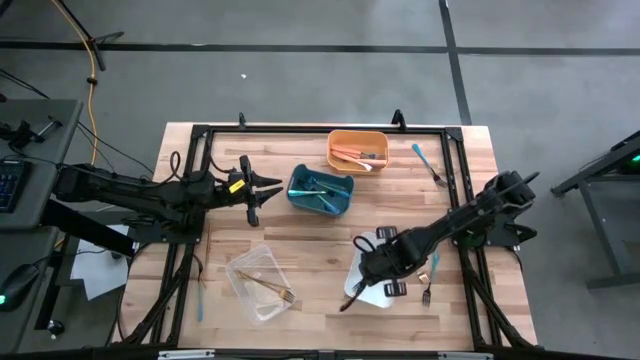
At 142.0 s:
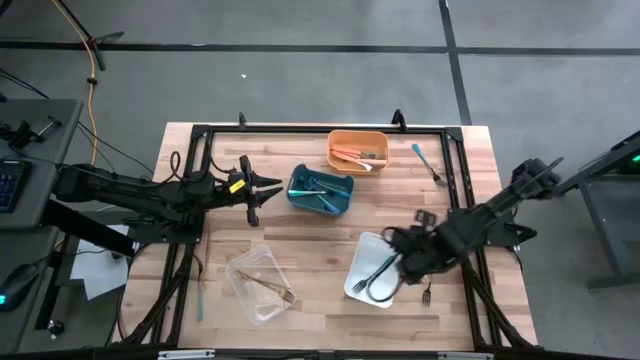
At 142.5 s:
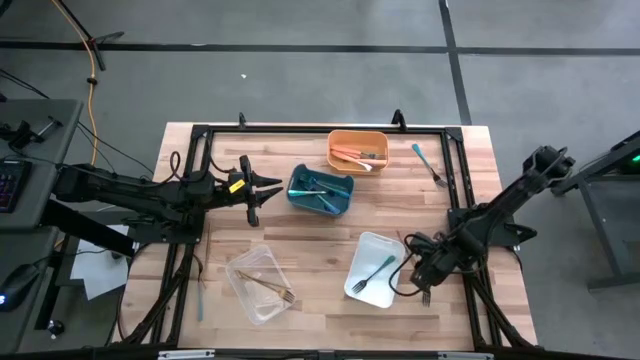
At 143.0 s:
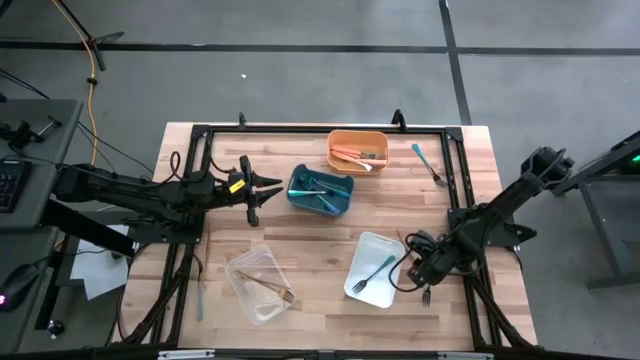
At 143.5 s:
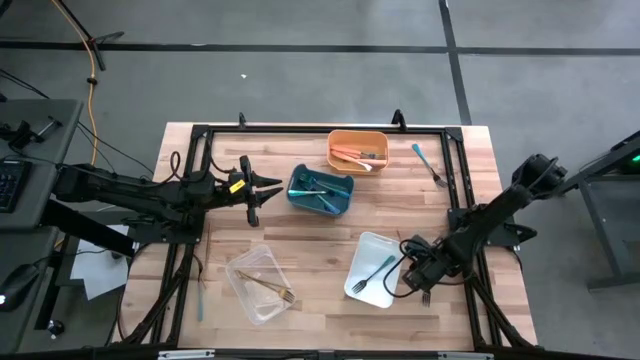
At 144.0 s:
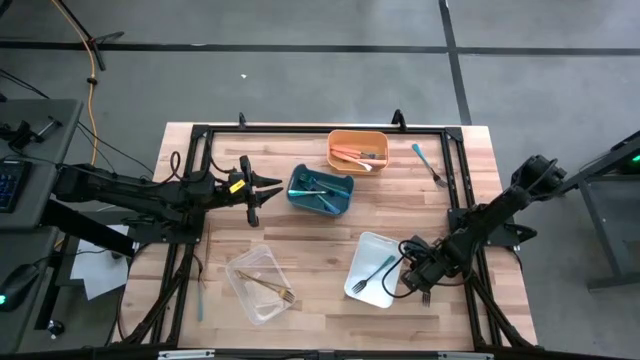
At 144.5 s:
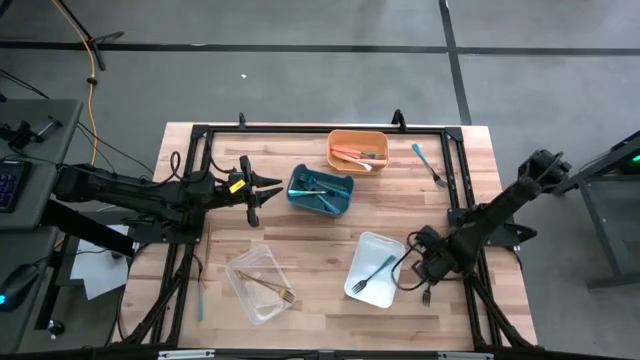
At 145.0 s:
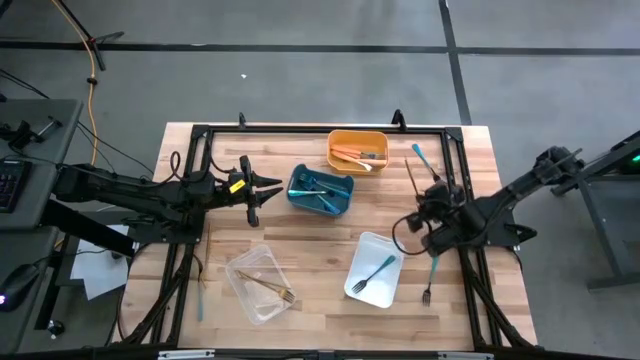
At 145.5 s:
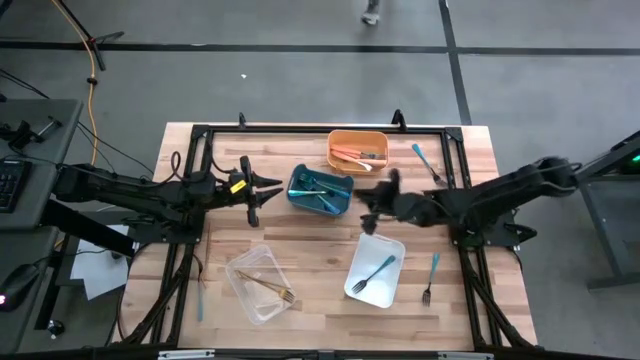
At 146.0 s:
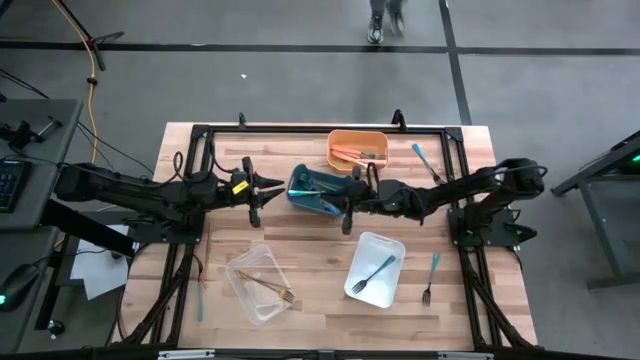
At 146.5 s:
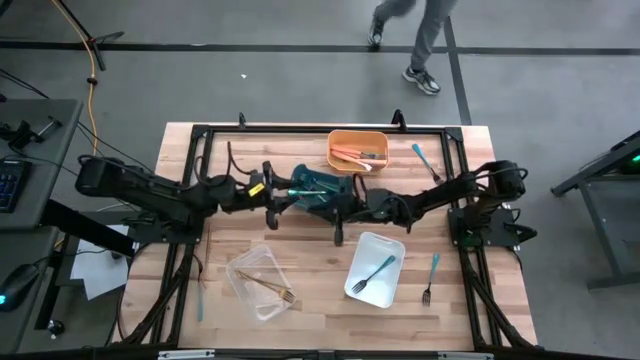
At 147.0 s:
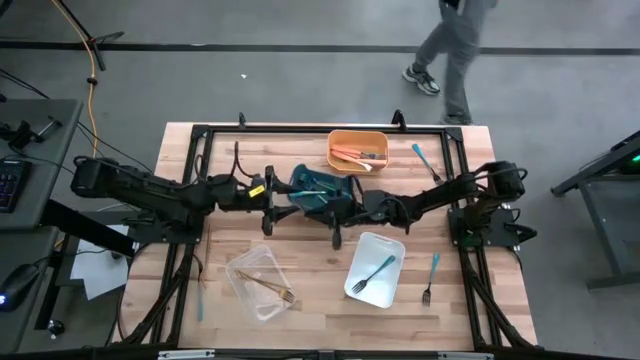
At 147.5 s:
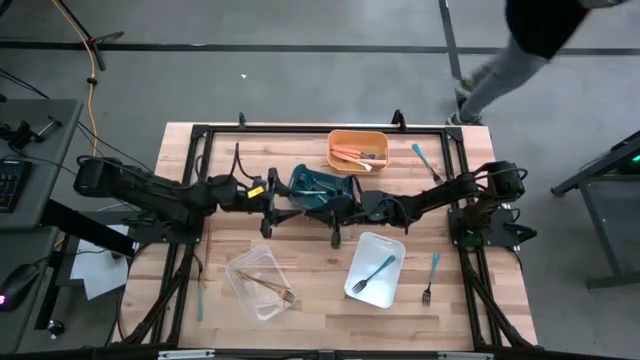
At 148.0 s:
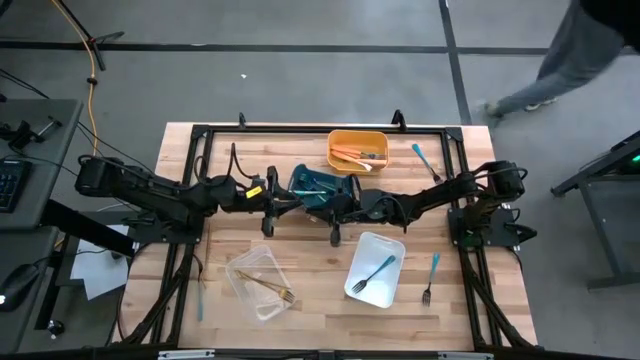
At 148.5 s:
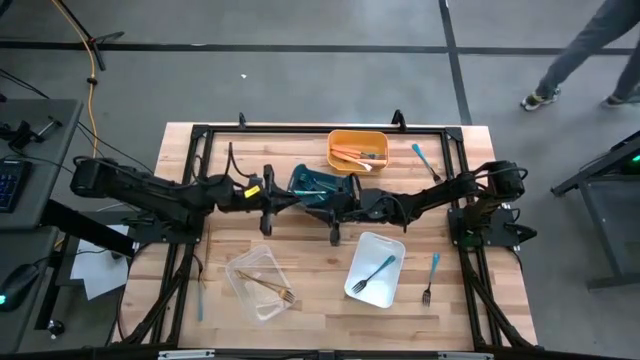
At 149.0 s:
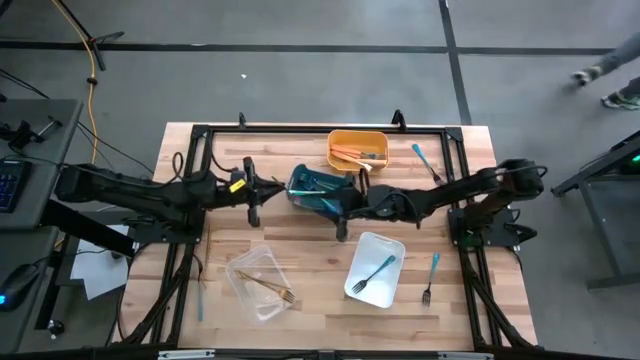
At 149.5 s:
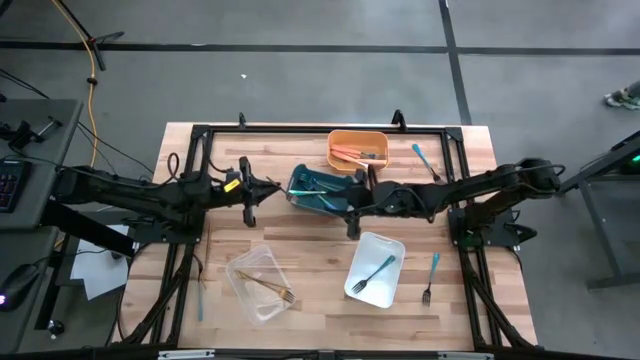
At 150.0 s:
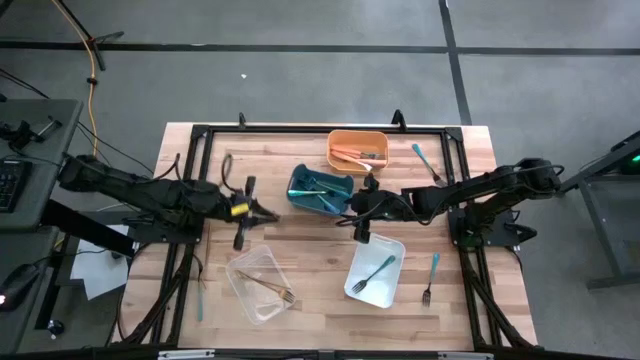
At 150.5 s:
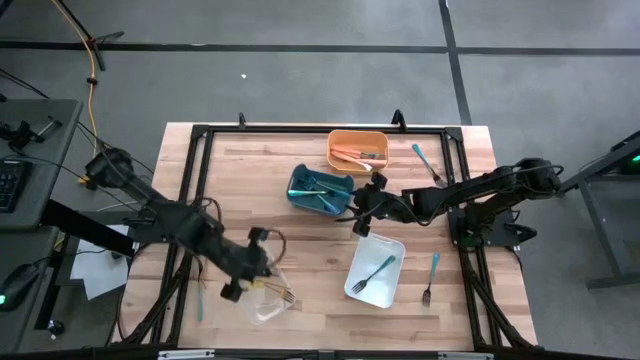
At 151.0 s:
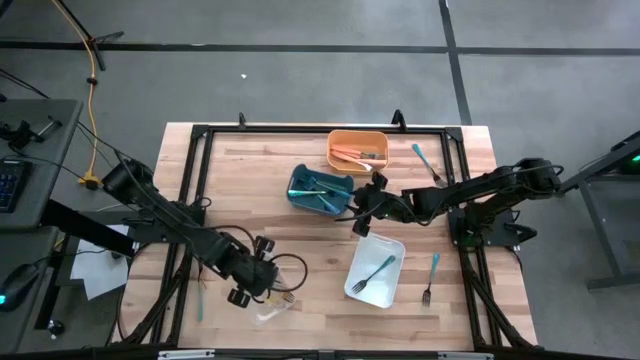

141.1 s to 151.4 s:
Task: Sort silverware by color (type)
Put the gold fork into the transparent bin

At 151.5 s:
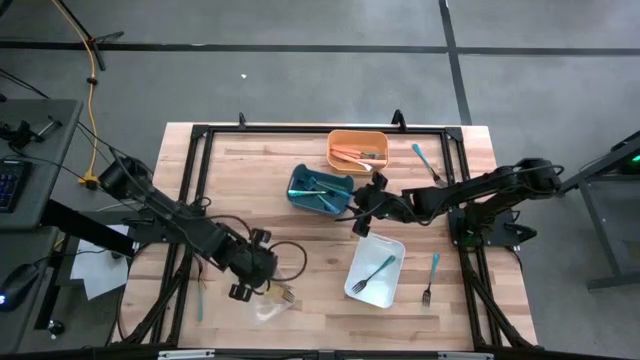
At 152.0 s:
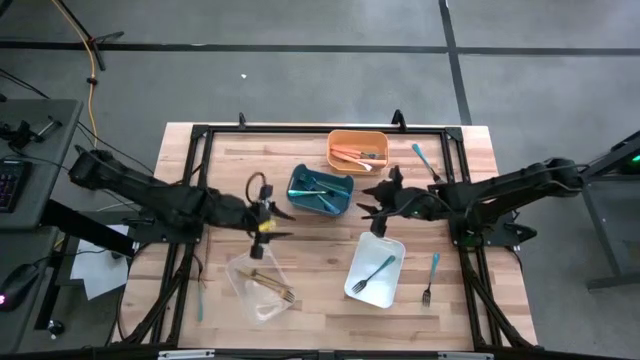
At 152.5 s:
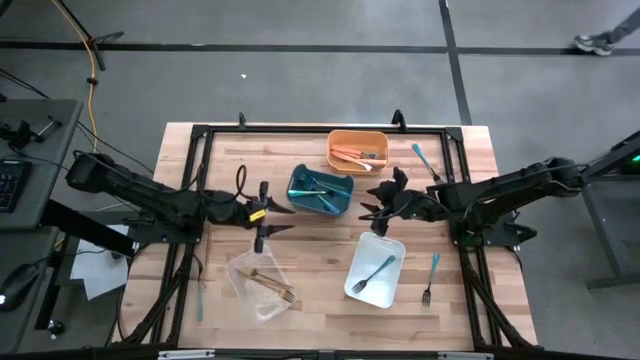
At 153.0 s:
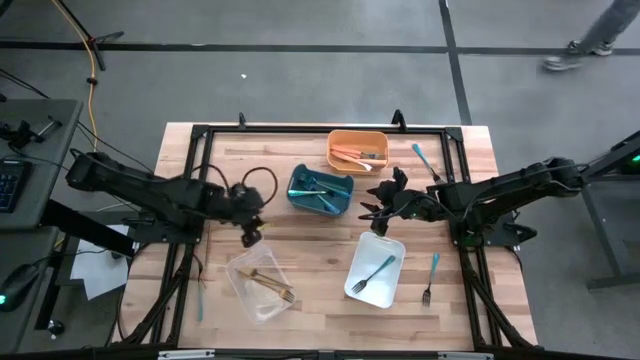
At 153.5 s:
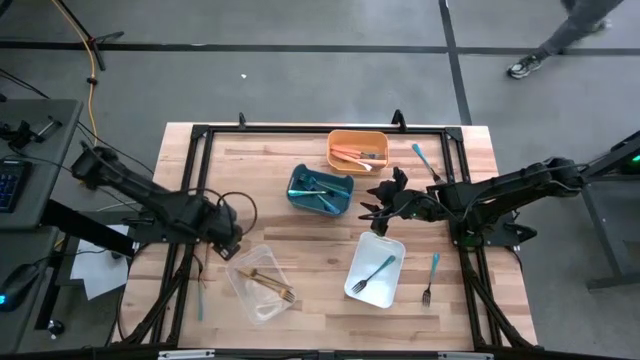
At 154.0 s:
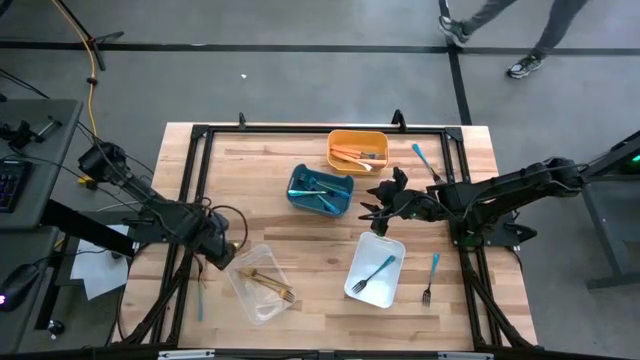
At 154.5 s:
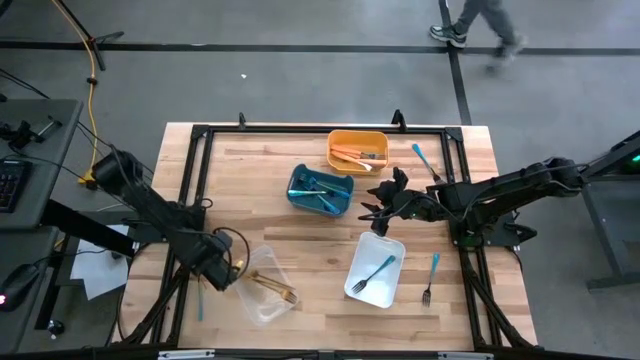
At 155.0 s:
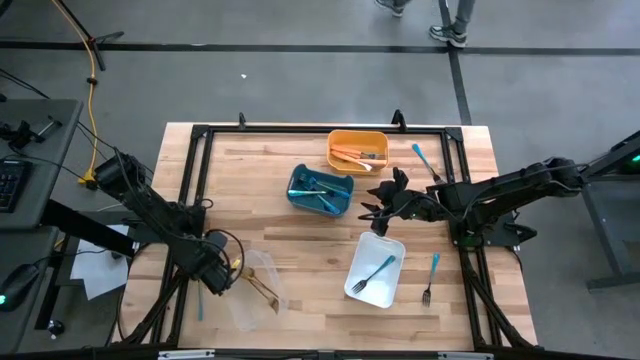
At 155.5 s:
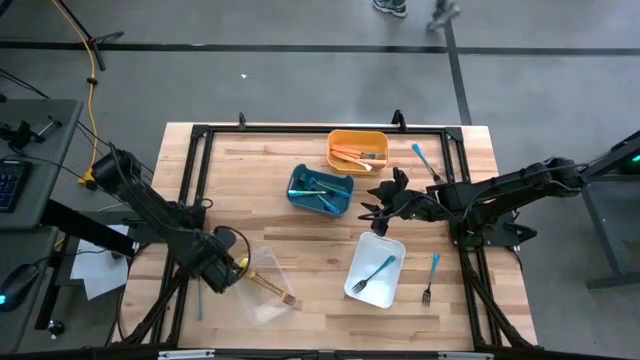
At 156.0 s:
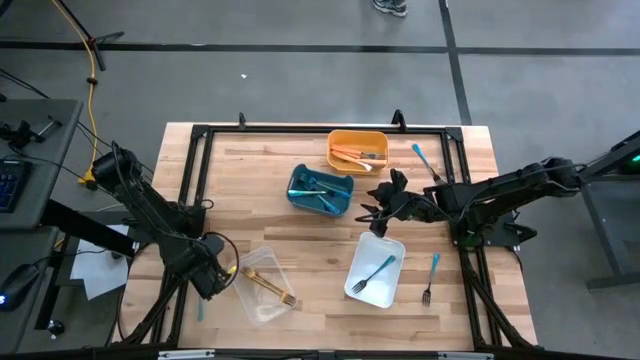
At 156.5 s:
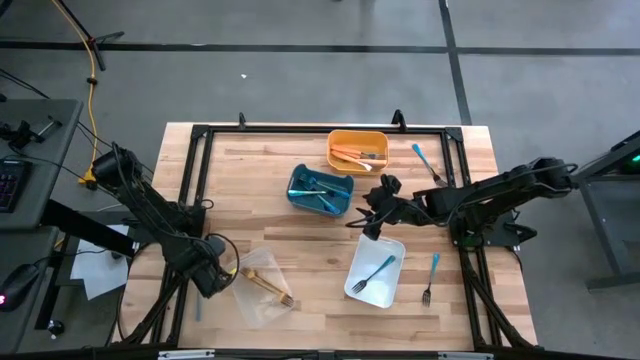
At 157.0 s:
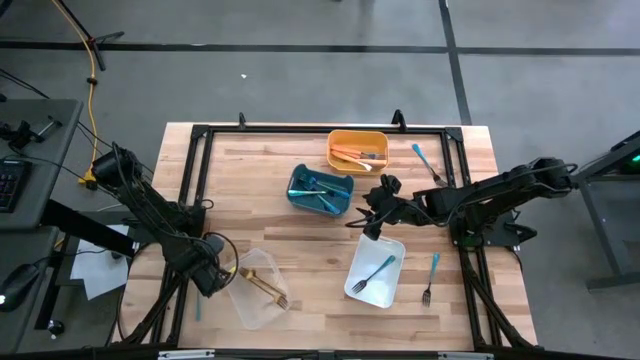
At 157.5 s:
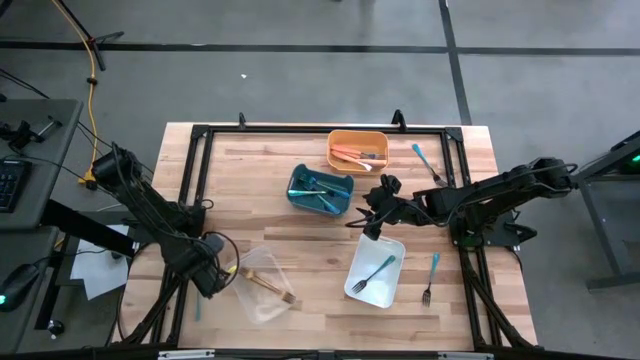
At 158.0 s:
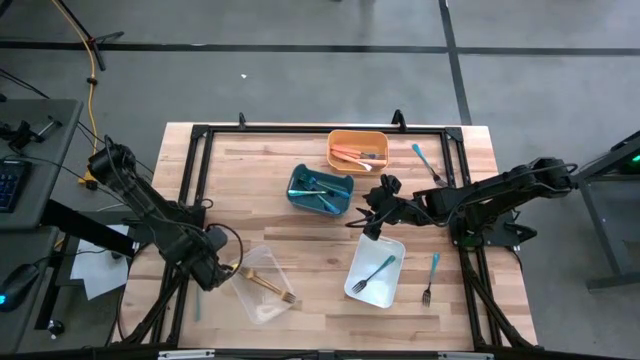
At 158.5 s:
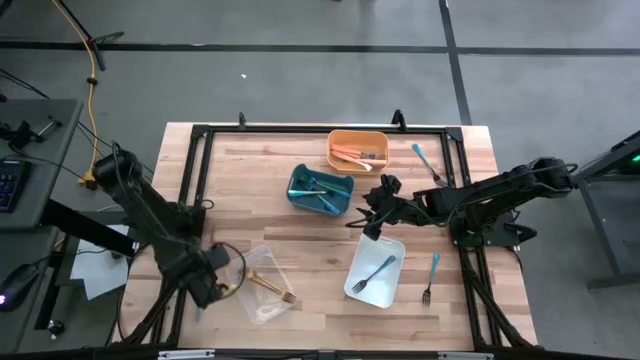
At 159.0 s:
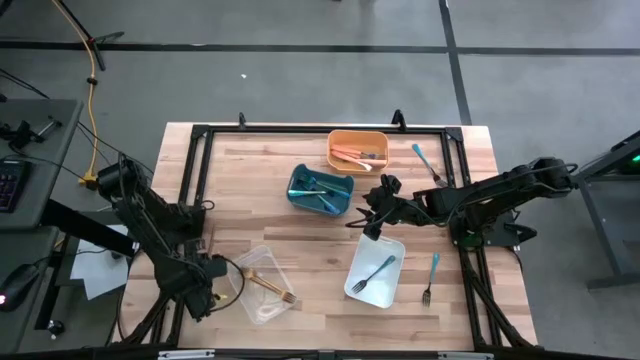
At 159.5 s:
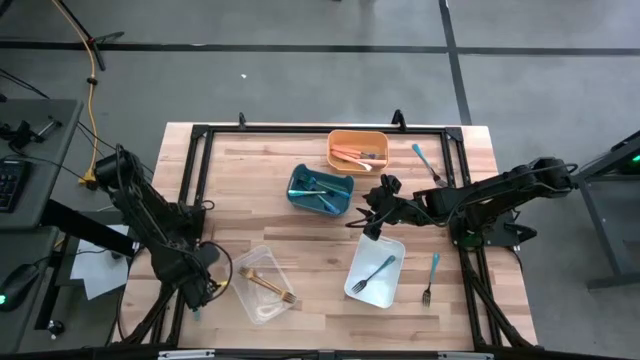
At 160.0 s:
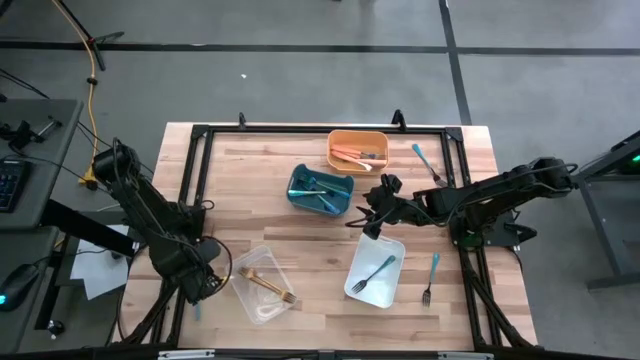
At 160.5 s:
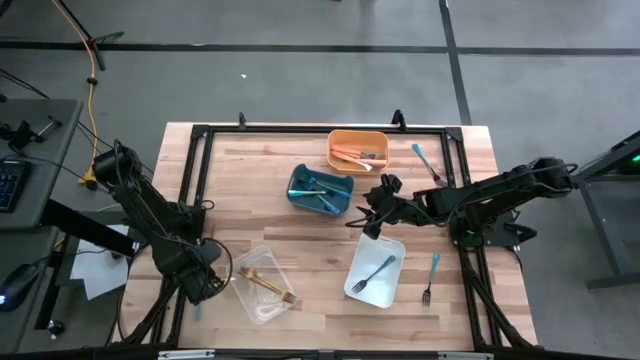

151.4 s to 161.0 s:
Put the gold fork into the transparent bin

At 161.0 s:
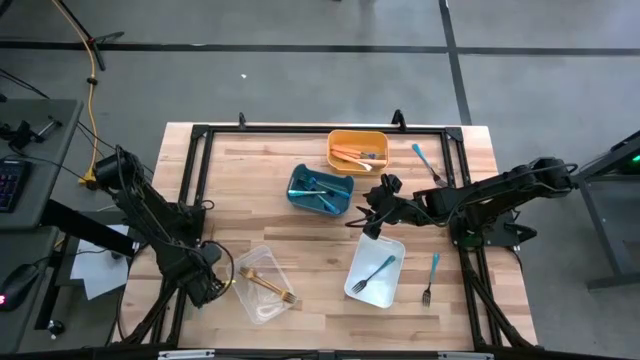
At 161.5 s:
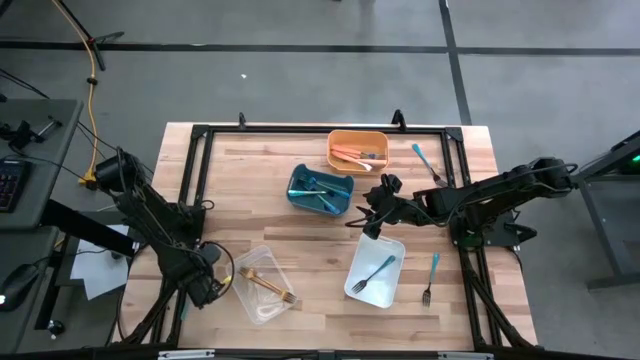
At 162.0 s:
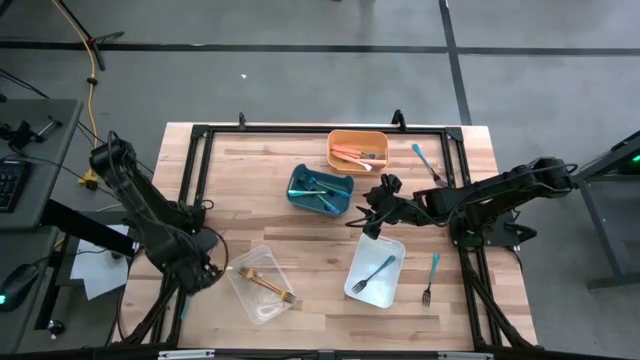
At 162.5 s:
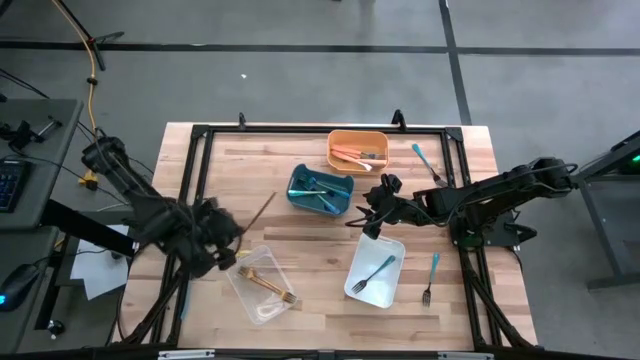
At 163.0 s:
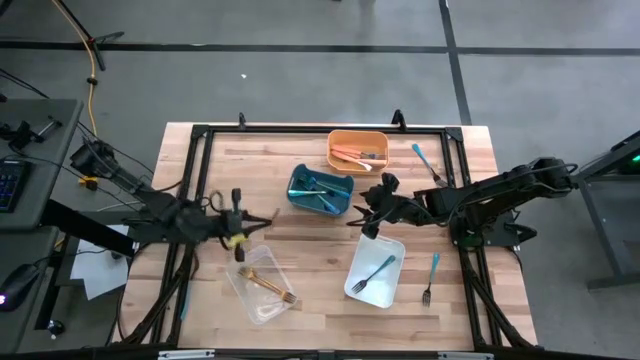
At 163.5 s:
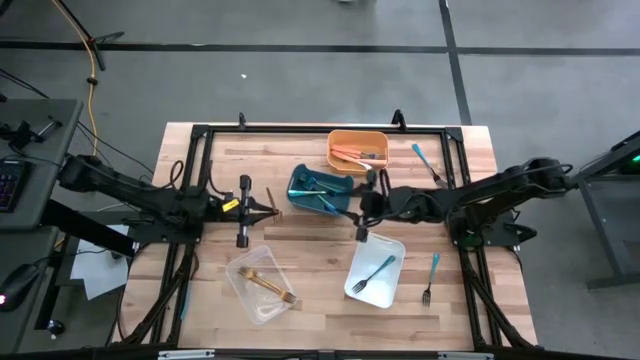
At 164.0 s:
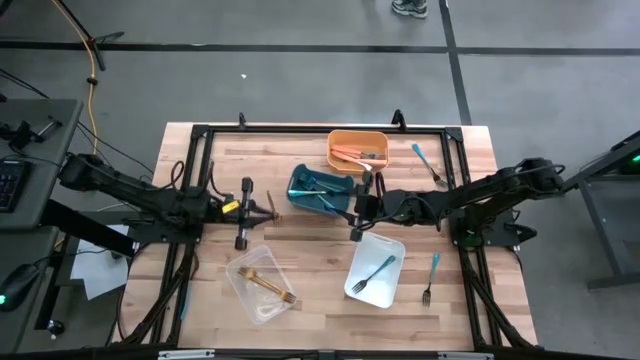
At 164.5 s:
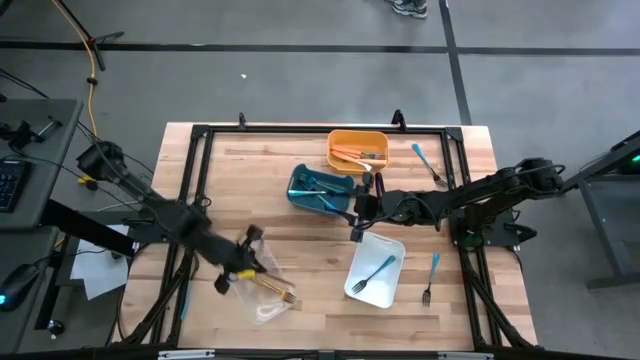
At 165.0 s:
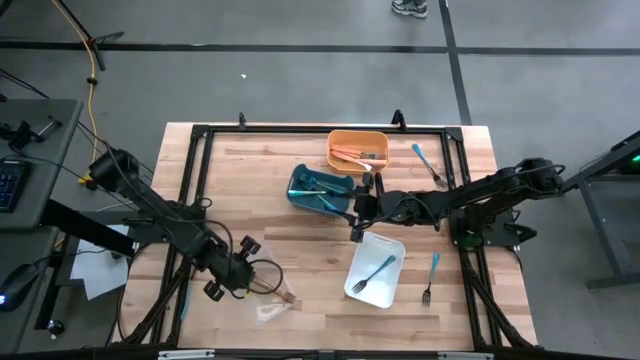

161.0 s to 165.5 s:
Put the gold fork into the transparent bin
